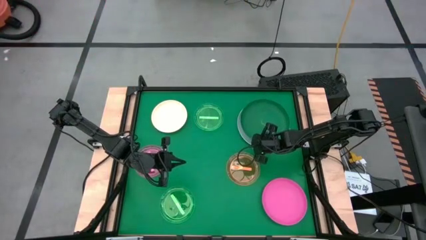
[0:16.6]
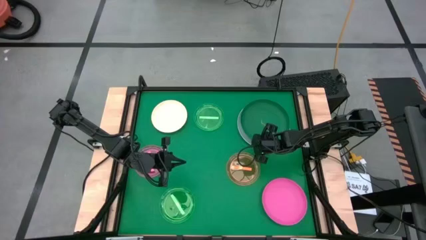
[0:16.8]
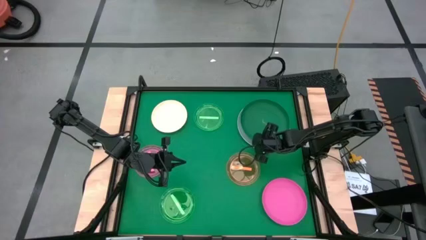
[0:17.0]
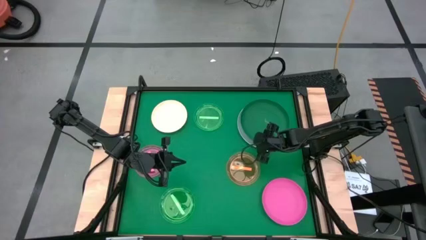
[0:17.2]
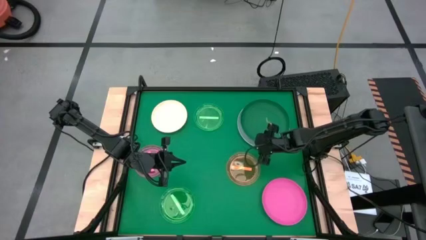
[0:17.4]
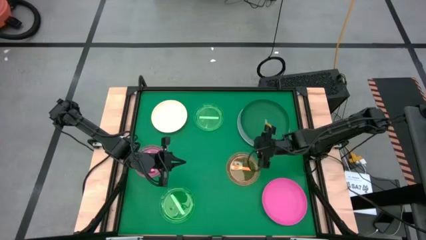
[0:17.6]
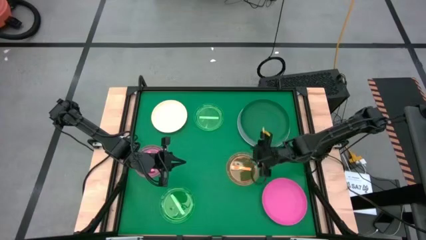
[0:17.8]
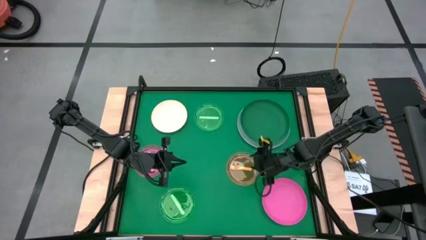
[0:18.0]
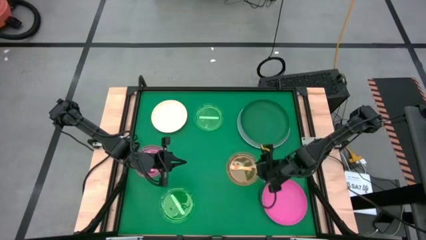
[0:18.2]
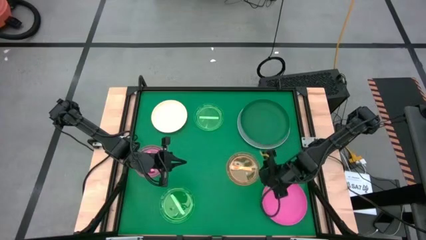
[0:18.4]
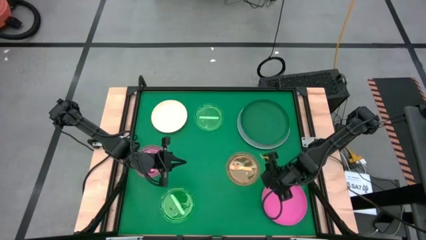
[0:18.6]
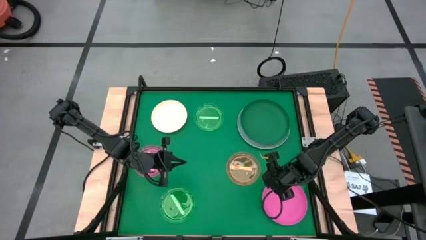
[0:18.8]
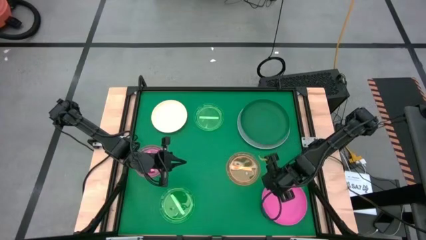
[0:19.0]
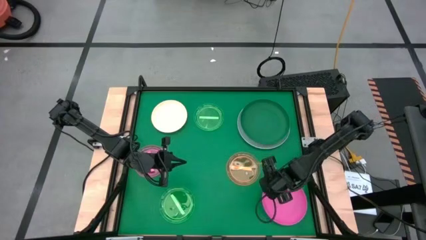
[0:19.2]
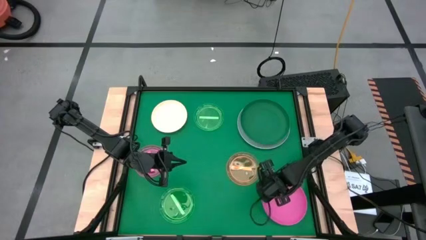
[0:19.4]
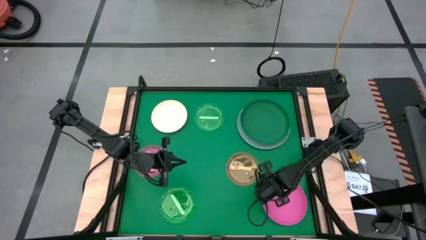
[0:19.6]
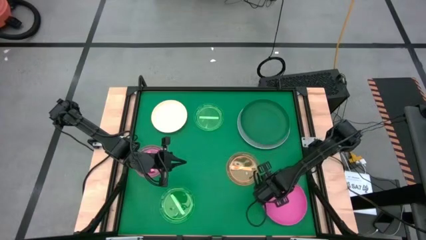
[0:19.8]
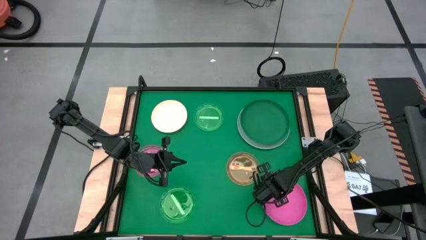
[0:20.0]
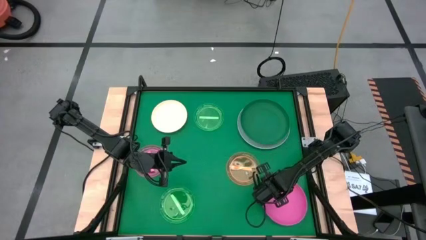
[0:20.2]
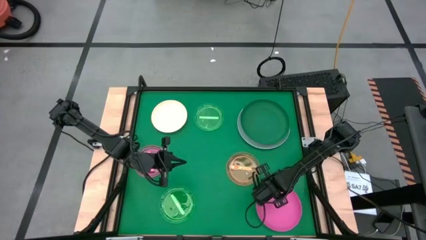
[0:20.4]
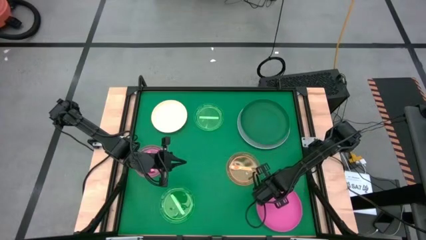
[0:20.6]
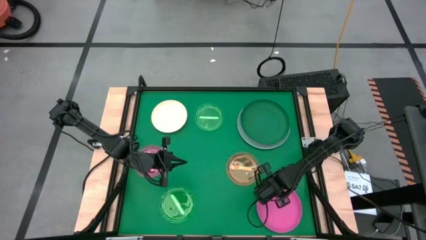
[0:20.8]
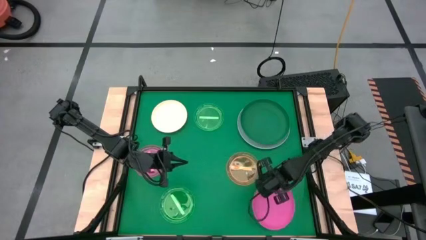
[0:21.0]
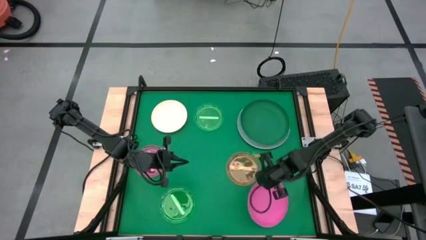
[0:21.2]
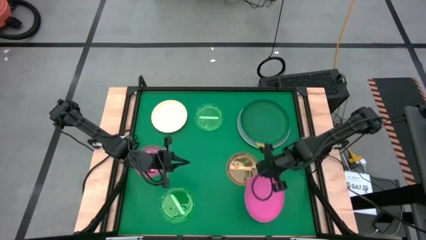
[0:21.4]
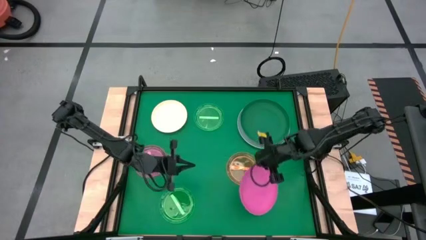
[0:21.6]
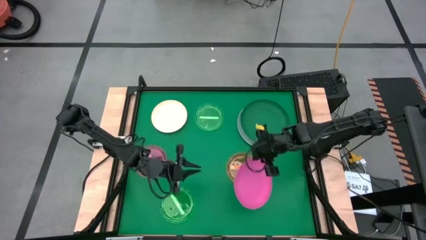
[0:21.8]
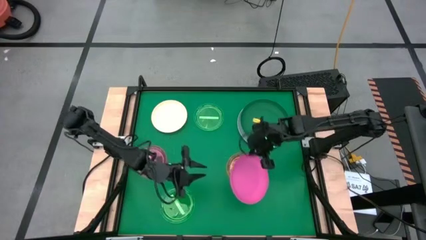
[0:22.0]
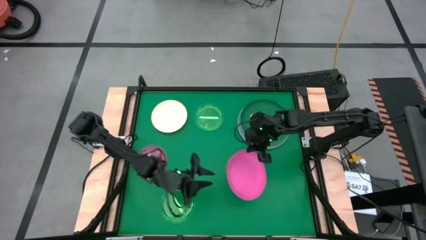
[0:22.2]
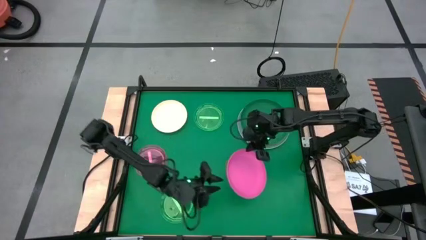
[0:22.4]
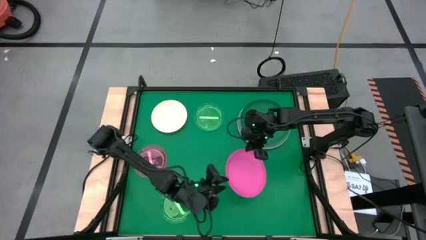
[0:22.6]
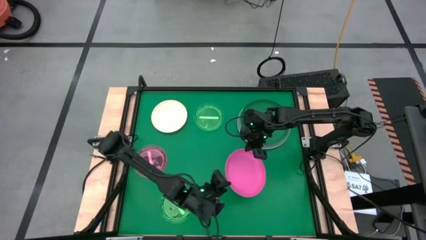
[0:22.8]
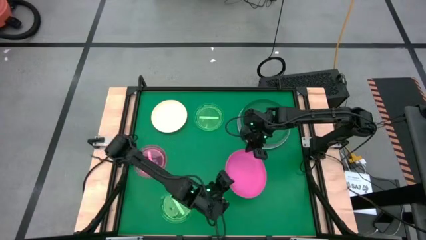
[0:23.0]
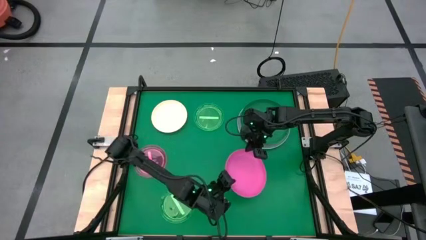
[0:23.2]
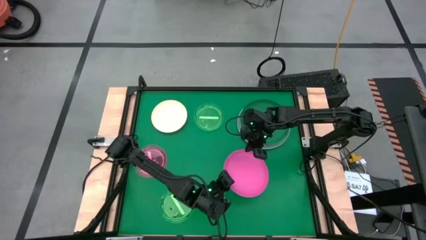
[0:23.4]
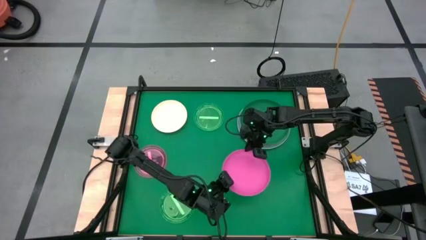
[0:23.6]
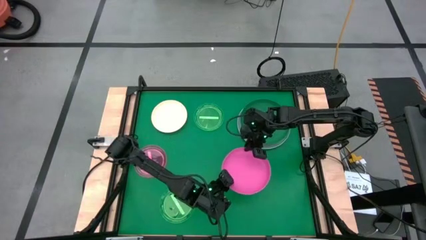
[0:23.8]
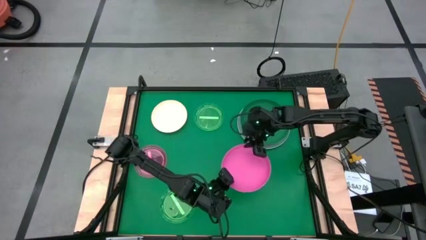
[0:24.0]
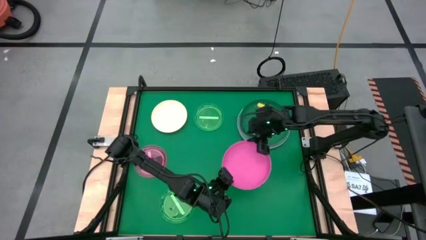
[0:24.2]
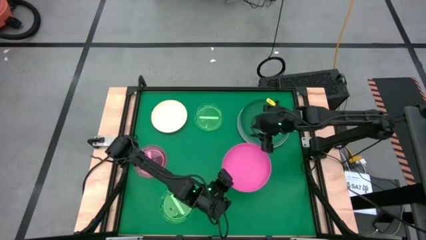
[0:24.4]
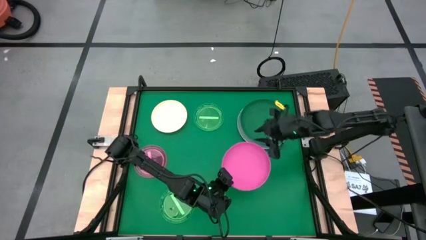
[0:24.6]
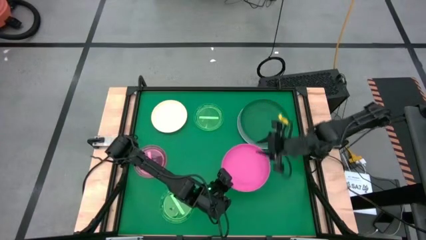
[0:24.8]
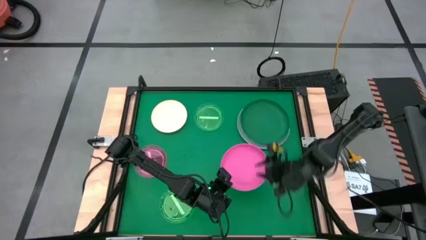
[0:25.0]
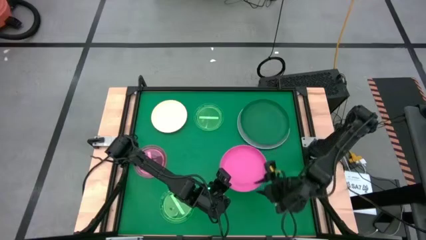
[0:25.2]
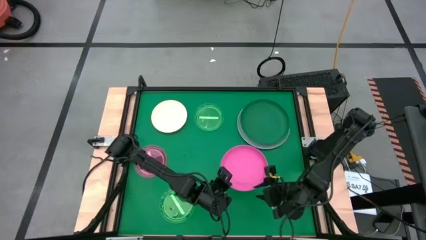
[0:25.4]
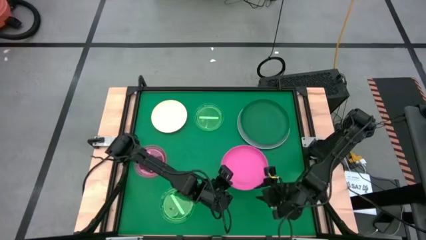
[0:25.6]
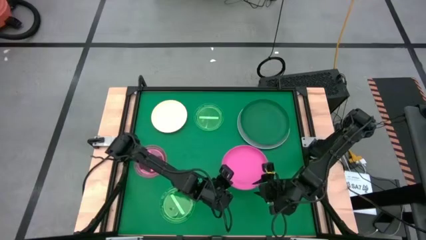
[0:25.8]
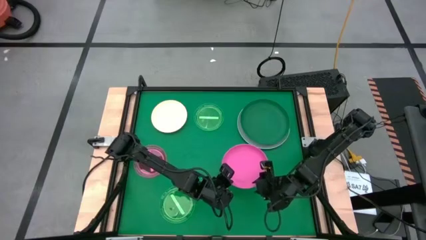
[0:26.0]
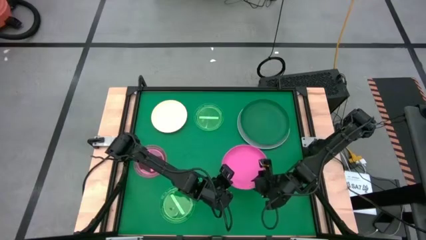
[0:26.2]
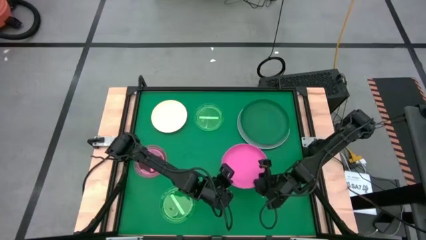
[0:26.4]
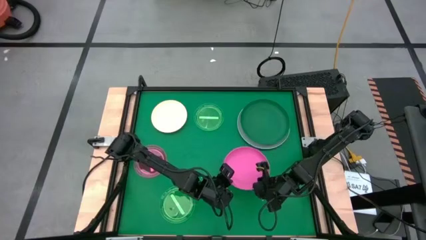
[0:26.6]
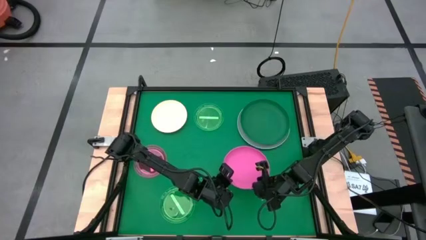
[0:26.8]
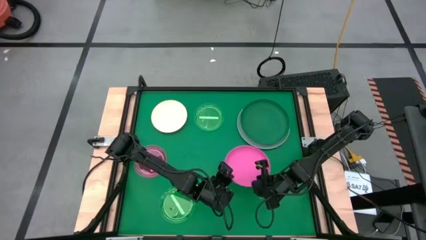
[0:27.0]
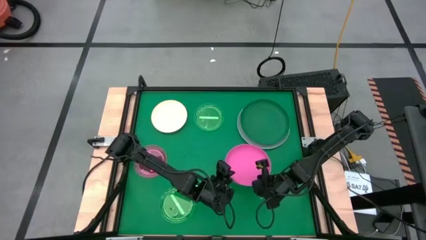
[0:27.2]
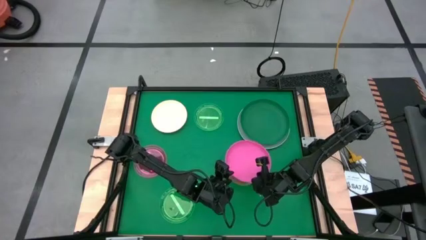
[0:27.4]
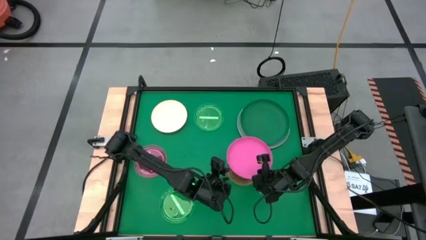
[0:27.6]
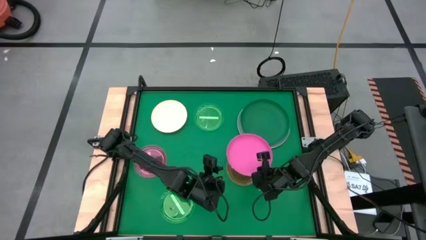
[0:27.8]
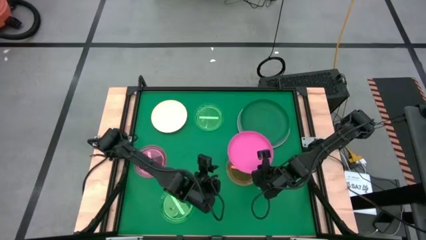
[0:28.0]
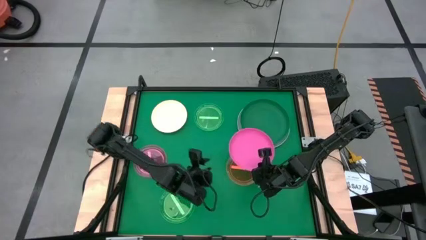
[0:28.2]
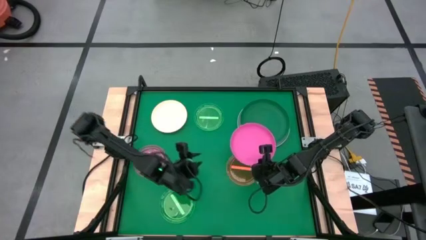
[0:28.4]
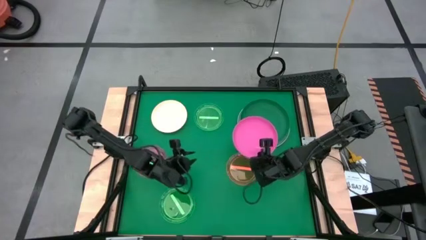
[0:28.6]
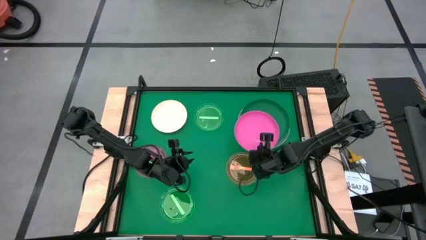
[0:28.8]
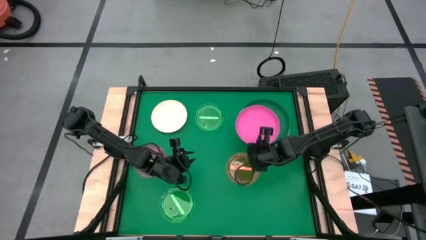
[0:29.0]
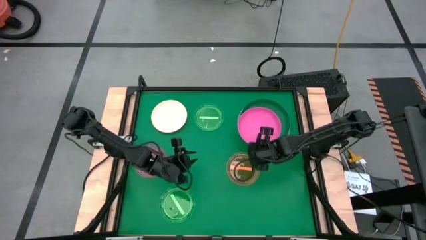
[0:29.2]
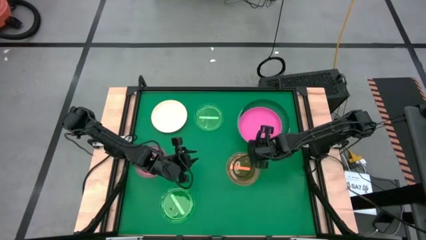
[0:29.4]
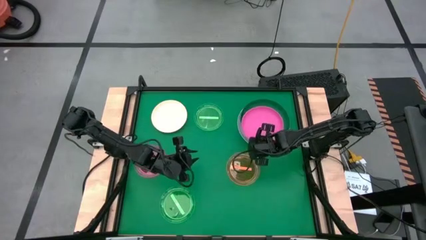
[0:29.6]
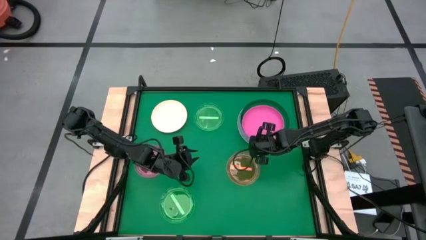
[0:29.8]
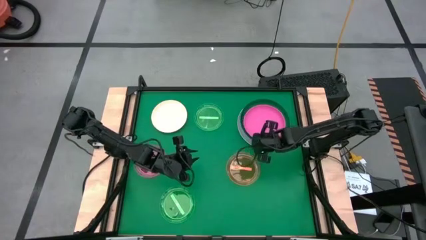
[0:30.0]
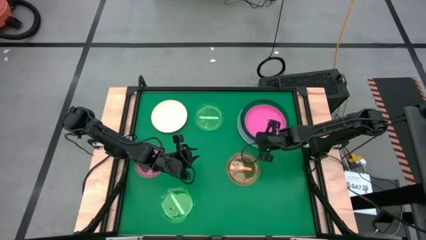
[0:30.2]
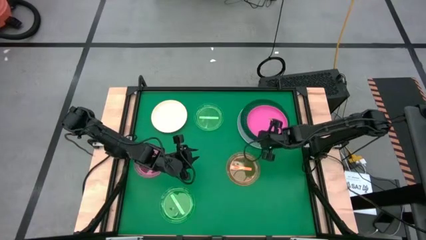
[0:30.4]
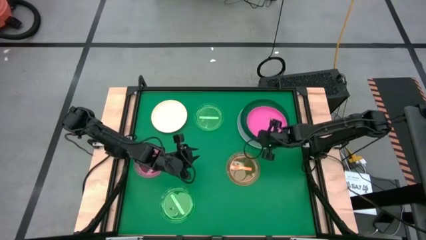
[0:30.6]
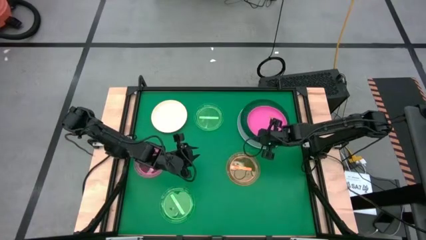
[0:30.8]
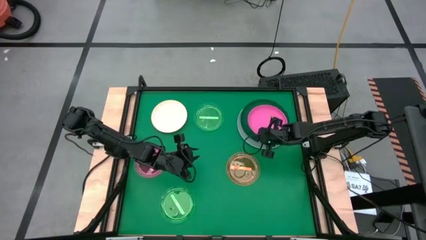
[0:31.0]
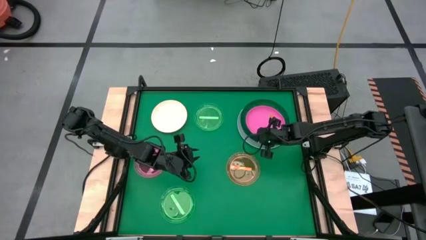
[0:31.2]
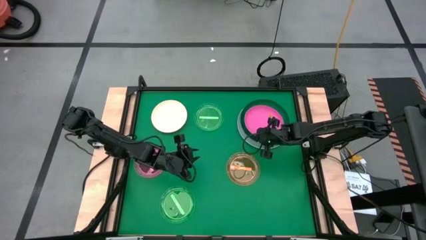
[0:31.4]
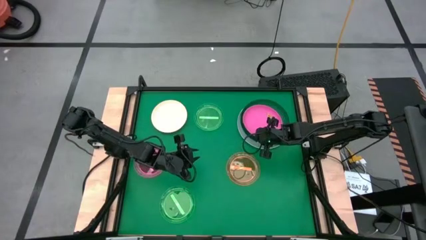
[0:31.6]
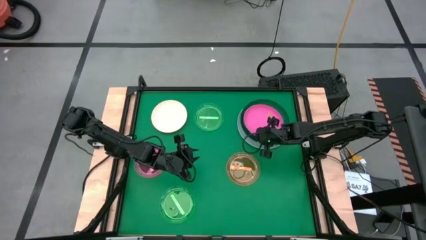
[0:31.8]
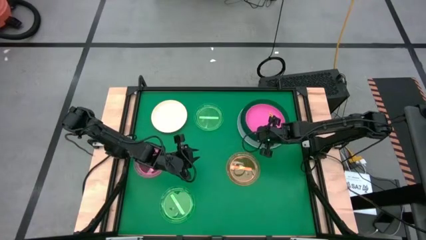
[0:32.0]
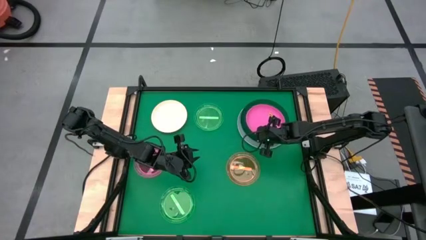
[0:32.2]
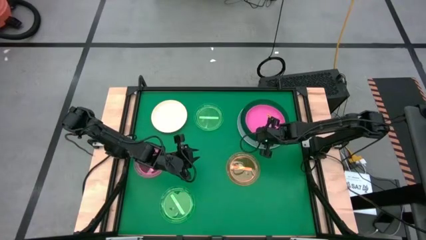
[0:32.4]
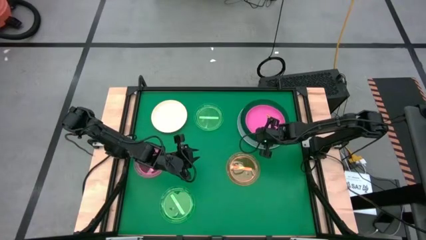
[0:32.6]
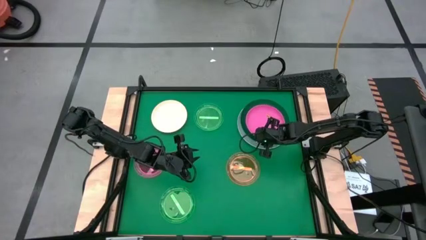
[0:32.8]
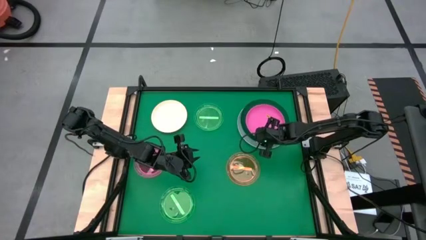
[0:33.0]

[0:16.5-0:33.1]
Task: Stack plastic plates
Stack the pink plate on the green plate
